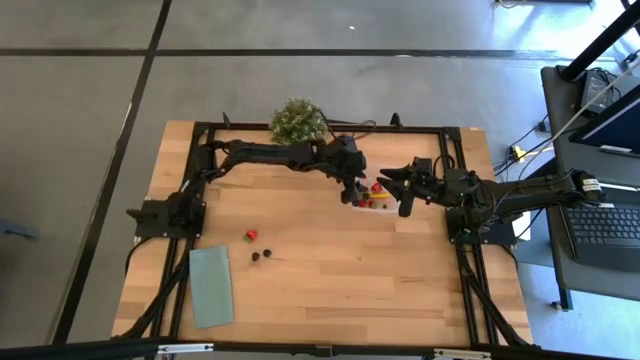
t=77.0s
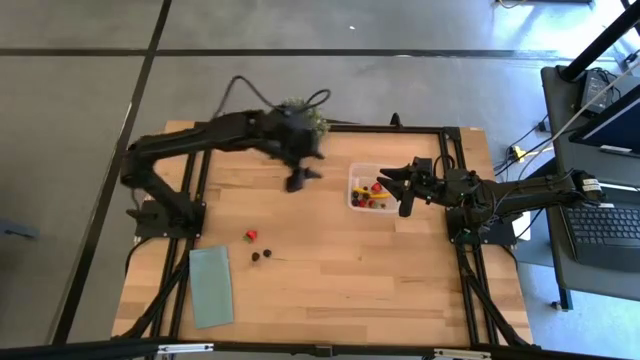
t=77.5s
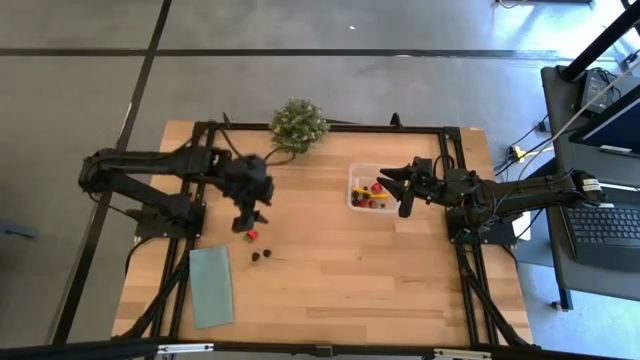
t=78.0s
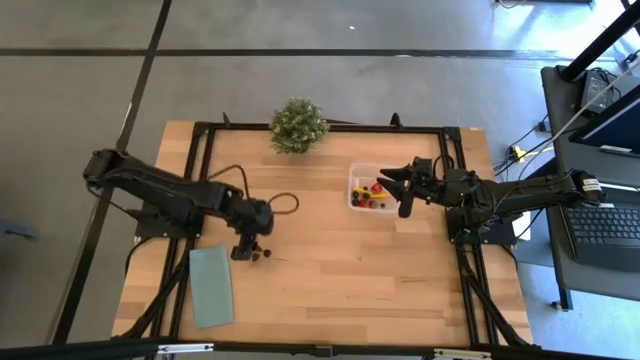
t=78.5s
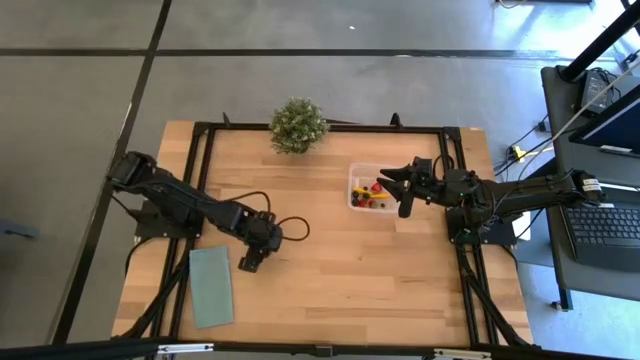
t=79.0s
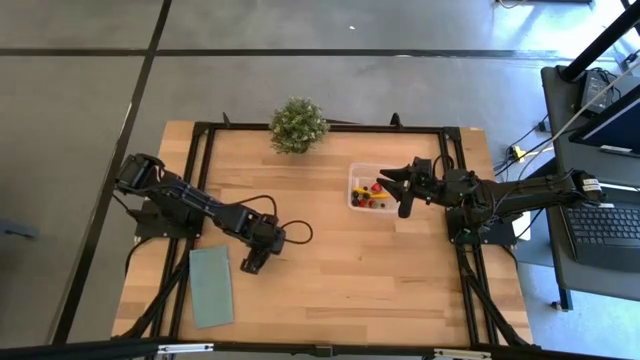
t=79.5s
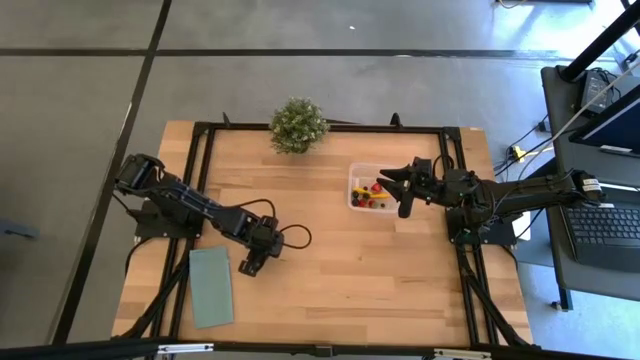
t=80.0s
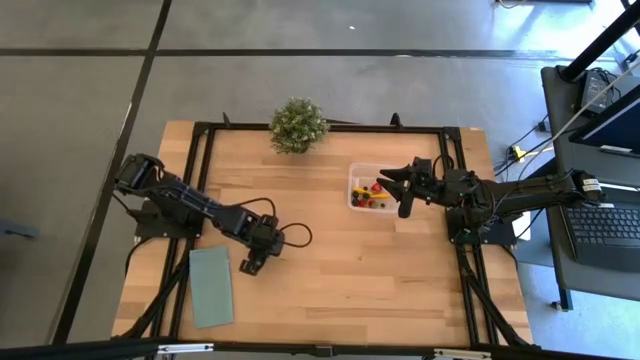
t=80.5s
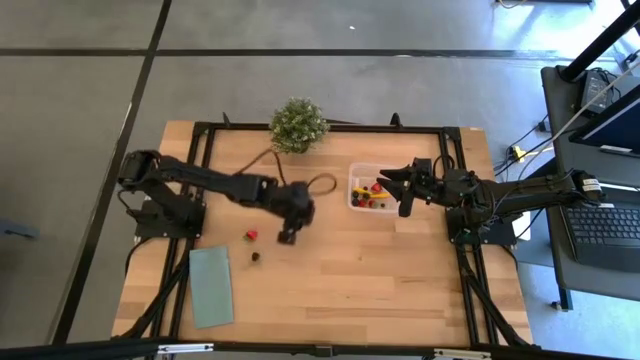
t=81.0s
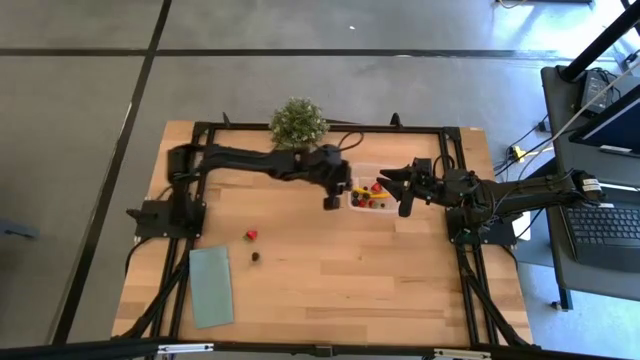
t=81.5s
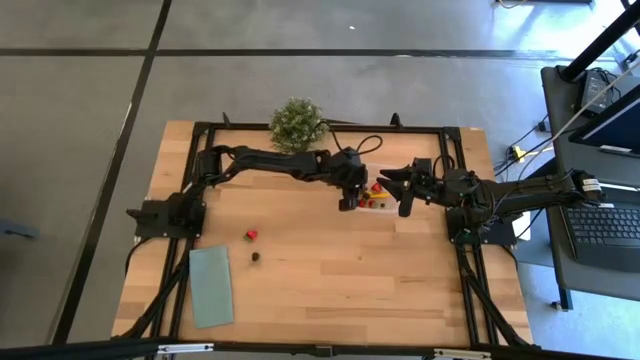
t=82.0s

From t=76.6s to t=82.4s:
Task: Pick and placing Produce into tupperware
Put the black cherry into the transparent bin

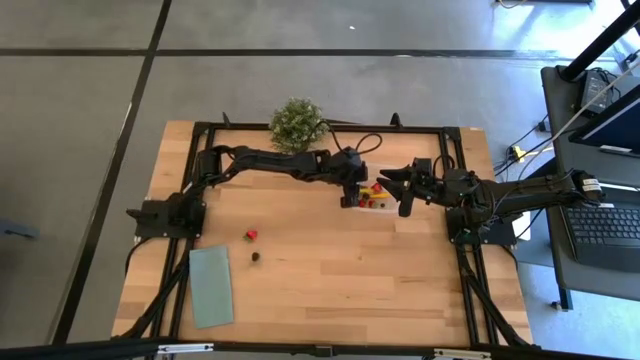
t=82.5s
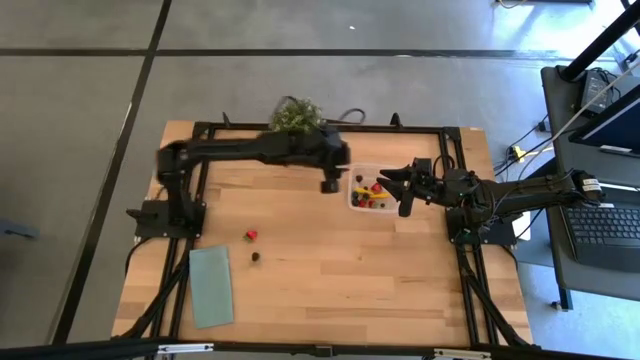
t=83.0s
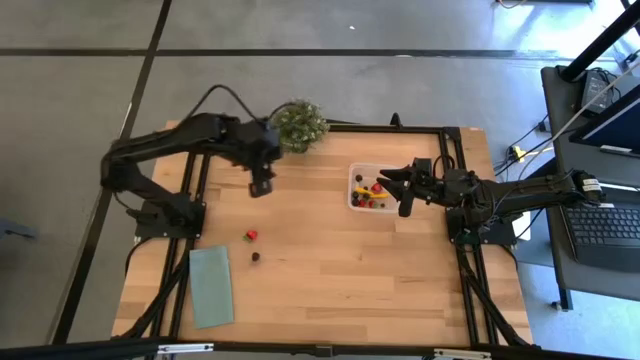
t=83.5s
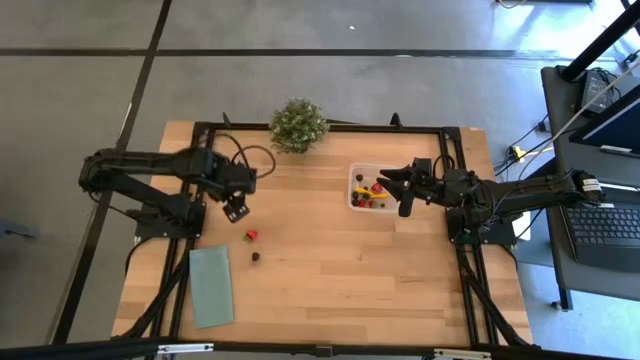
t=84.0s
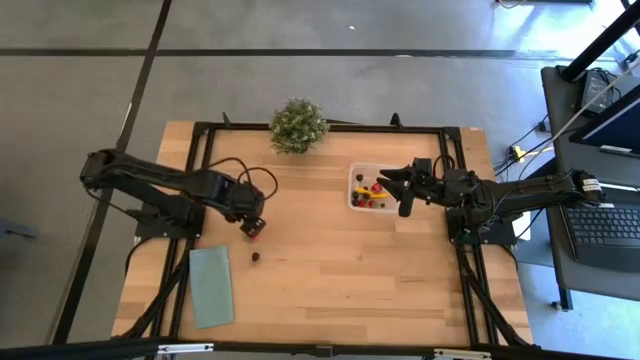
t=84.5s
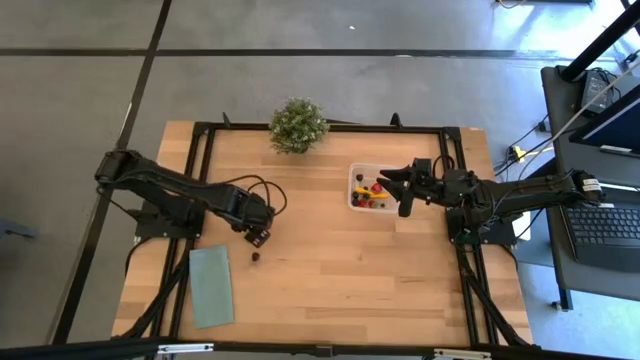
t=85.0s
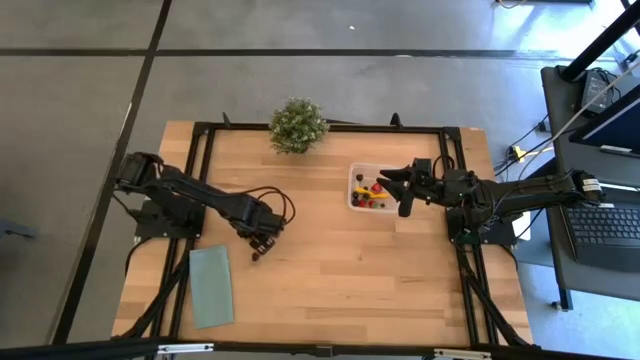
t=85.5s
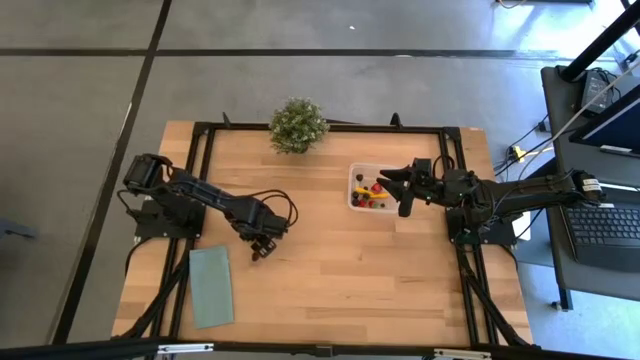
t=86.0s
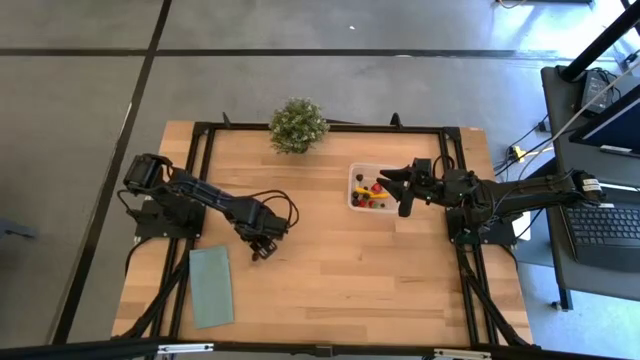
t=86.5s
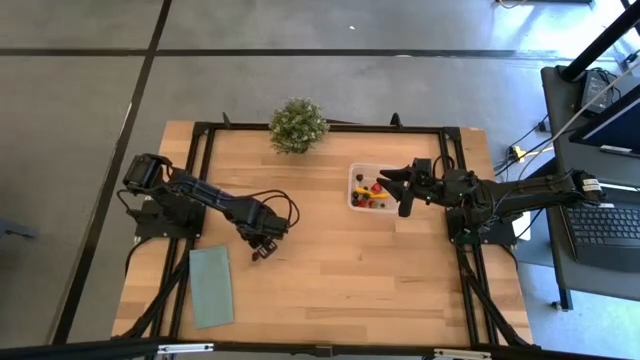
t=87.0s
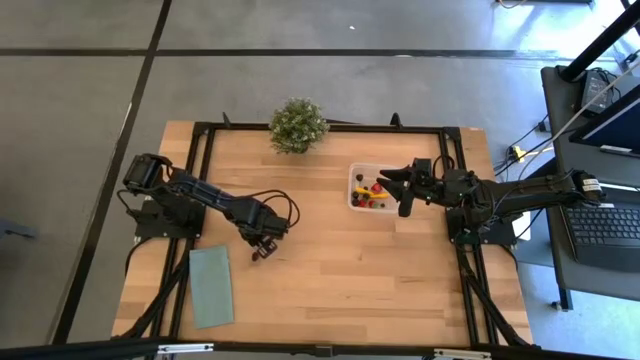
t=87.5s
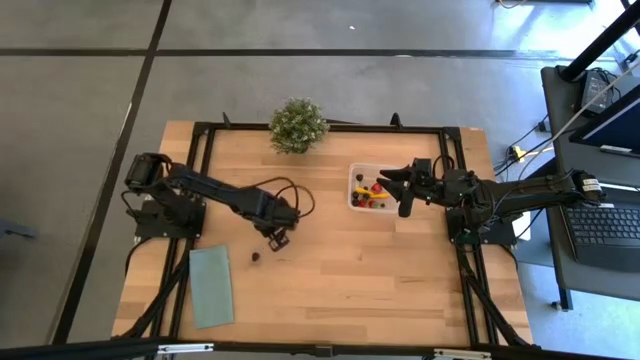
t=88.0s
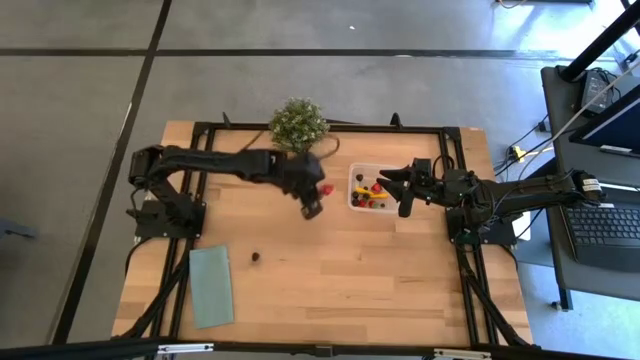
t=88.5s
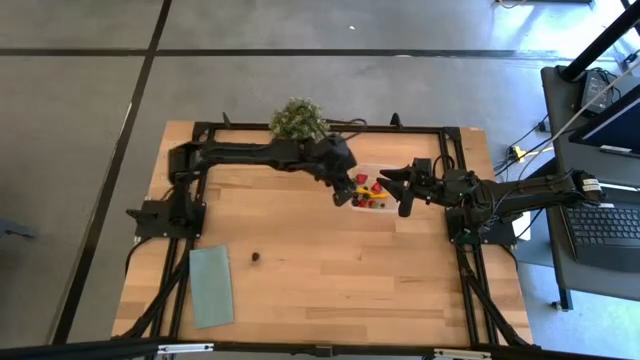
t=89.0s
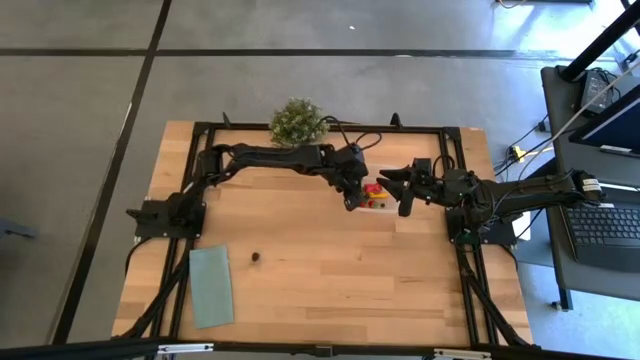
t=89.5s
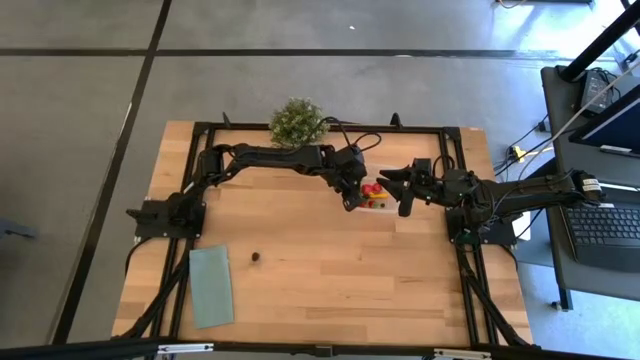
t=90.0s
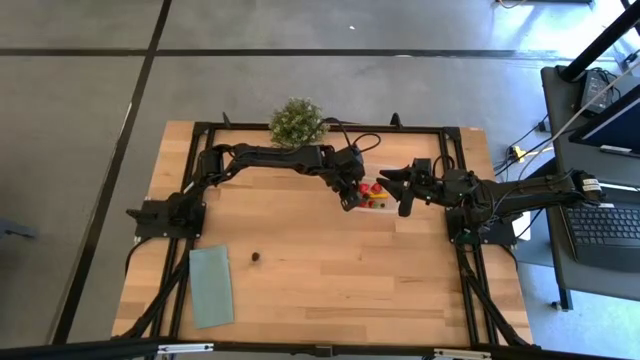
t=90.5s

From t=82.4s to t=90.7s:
Put the strawberry into the transparent bin

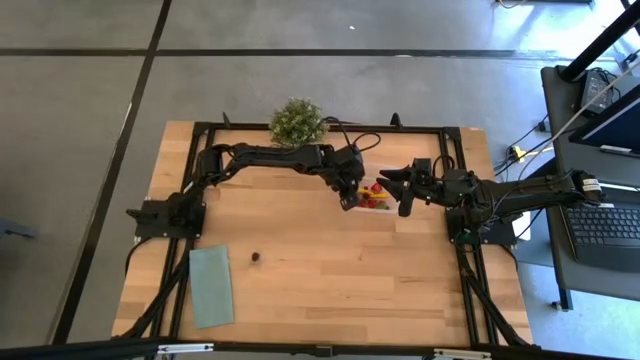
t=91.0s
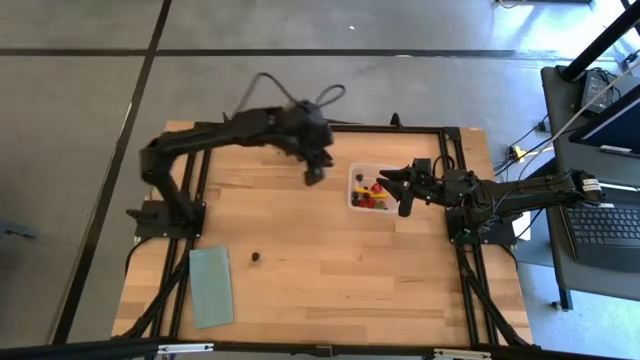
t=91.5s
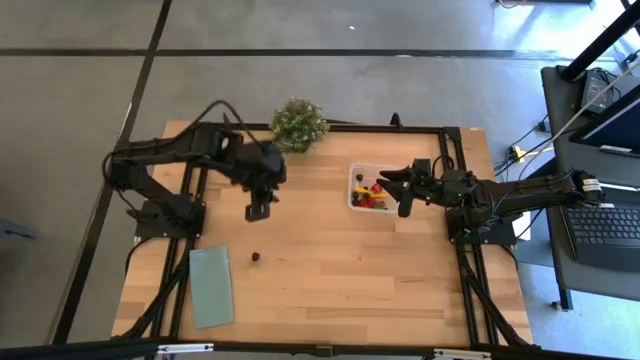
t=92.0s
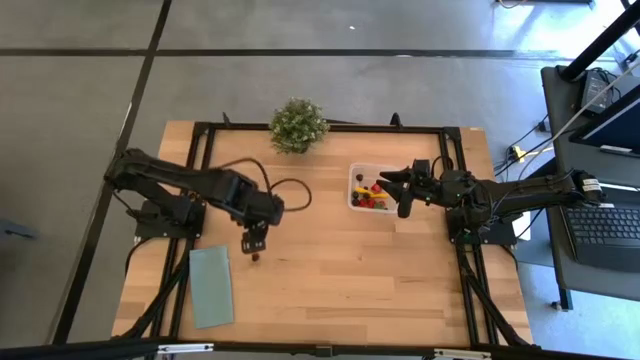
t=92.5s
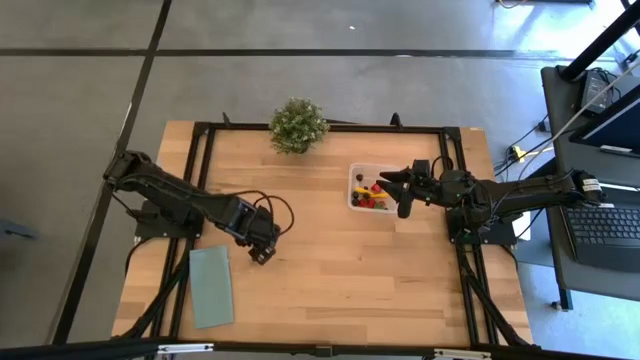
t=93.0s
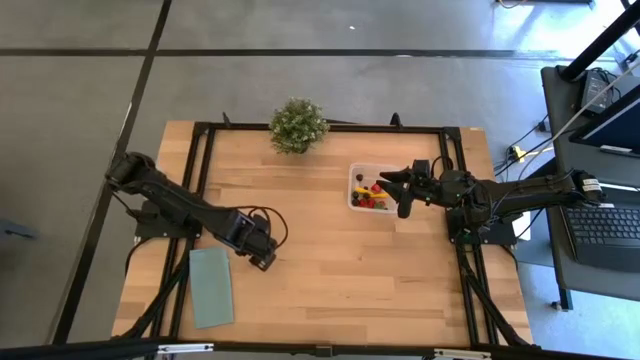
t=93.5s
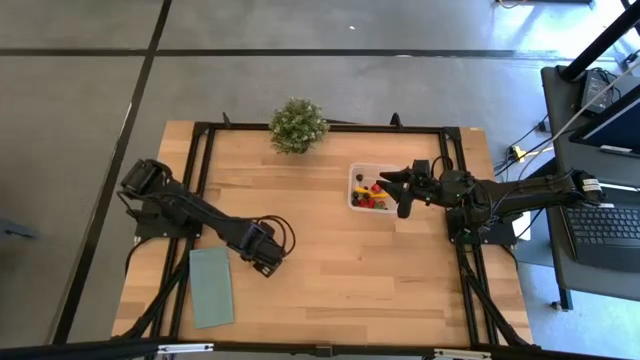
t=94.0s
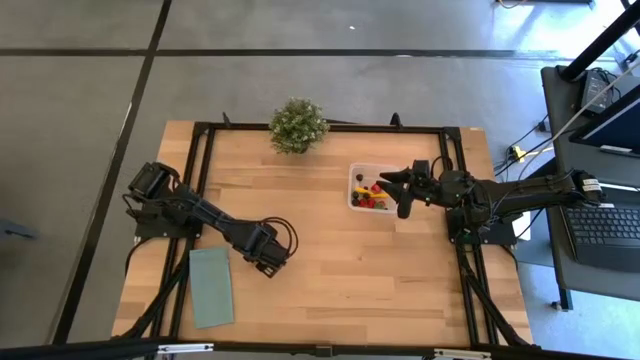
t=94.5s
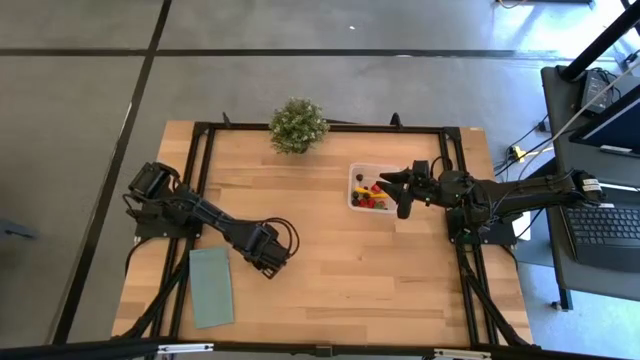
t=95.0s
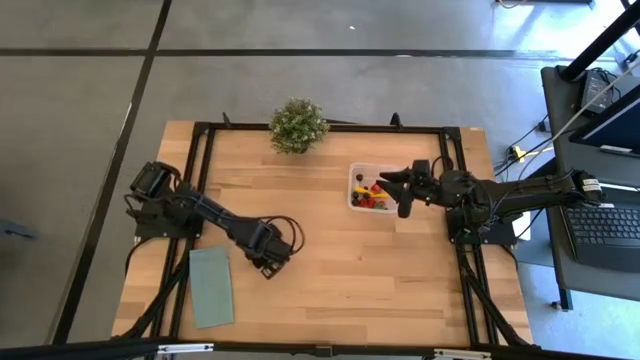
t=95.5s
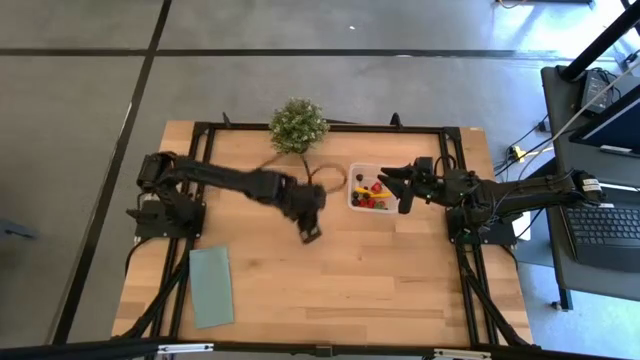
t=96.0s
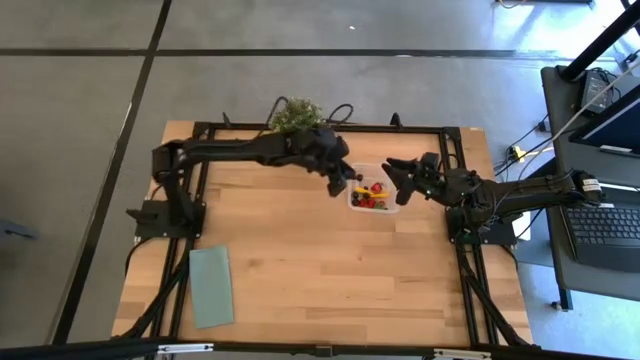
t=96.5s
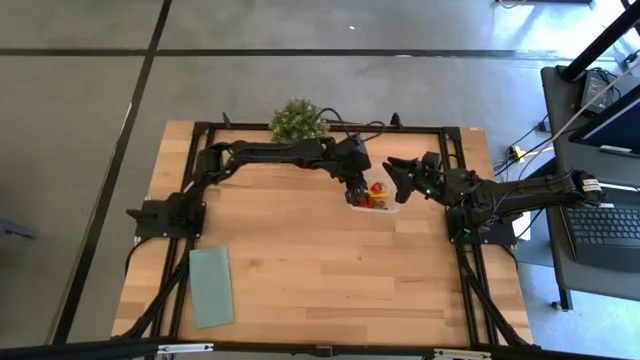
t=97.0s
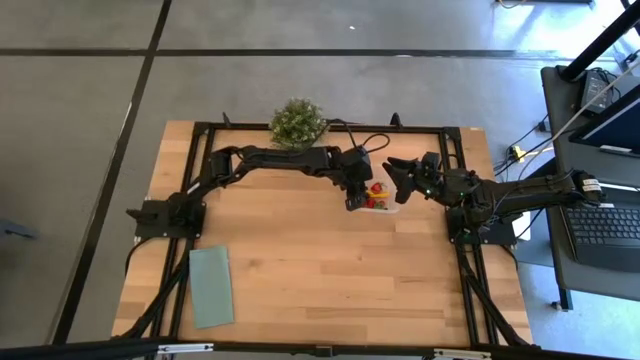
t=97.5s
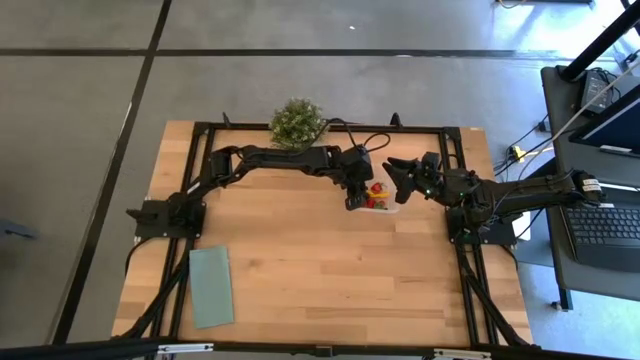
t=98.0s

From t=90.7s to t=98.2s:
Put the blackberry into the transparent bin

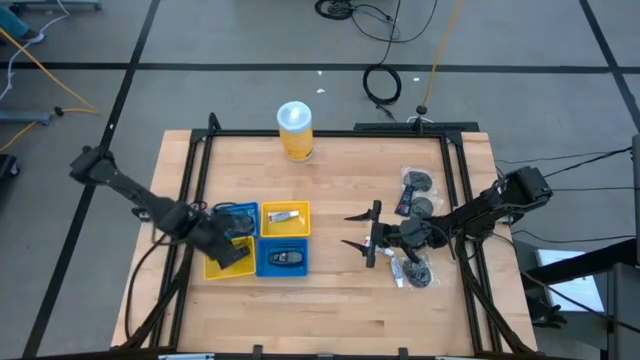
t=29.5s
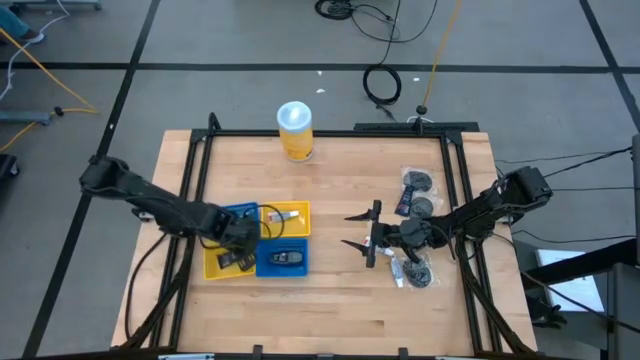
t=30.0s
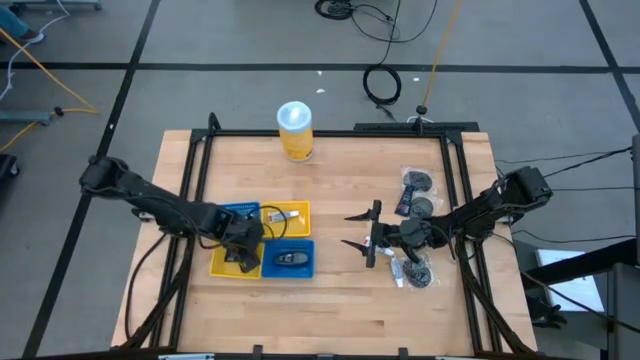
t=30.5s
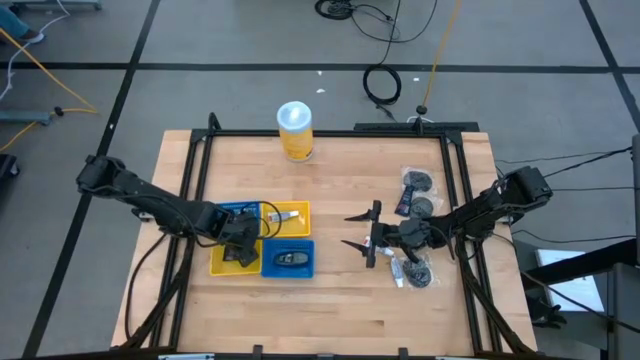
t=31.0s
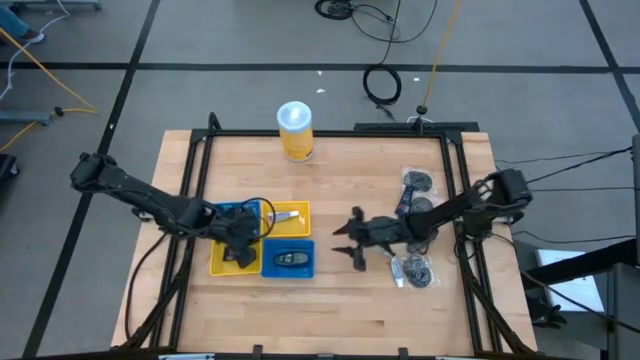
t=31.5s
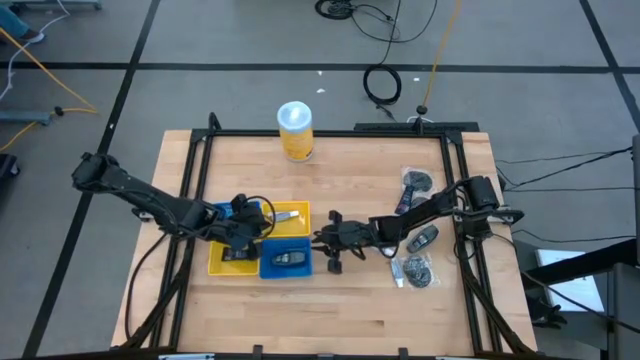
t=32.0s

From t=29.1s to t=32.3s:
Task: Pick & Place Travel size toiletries
Adjust the bins
